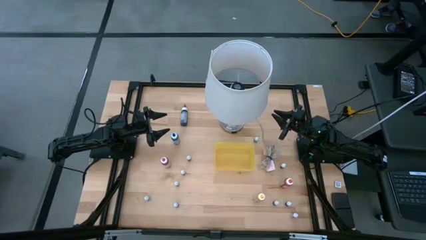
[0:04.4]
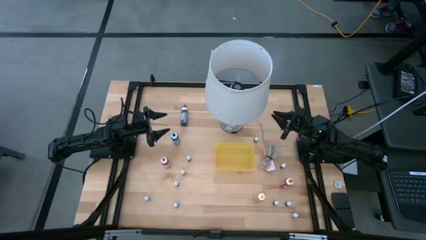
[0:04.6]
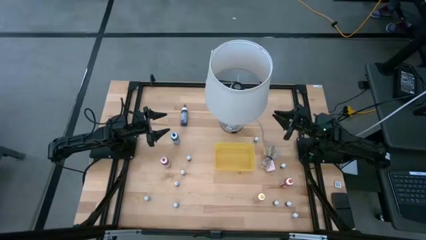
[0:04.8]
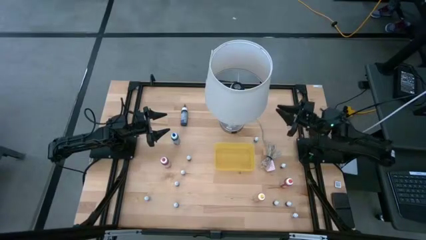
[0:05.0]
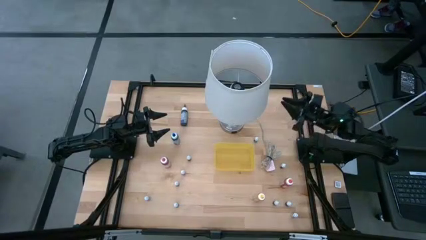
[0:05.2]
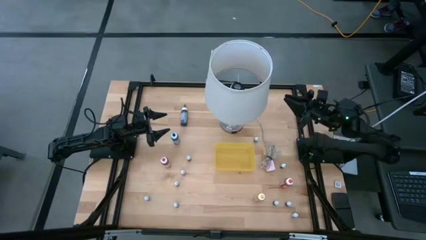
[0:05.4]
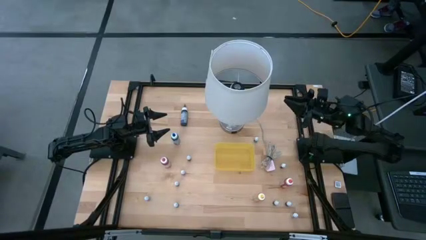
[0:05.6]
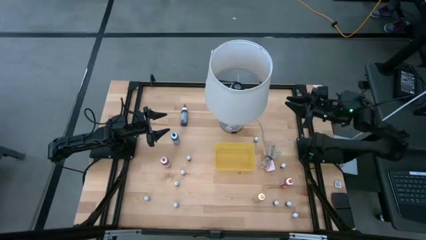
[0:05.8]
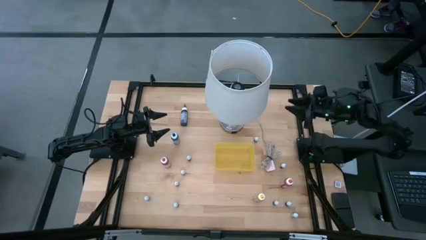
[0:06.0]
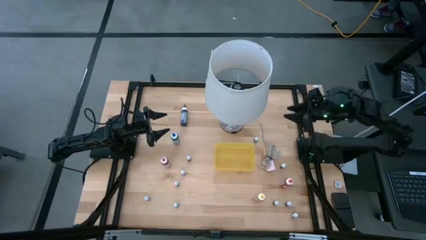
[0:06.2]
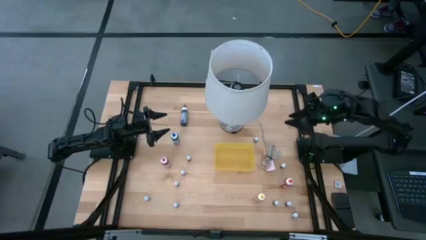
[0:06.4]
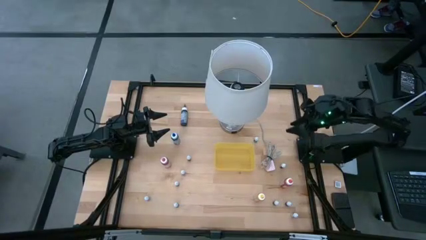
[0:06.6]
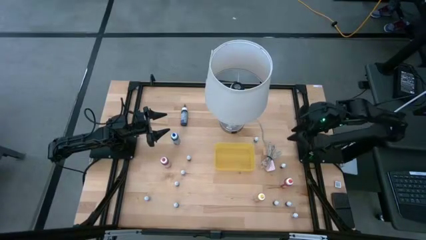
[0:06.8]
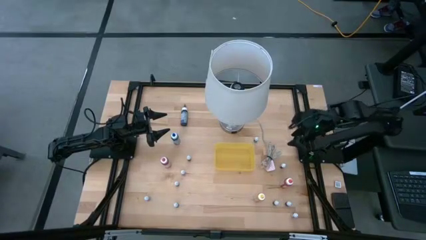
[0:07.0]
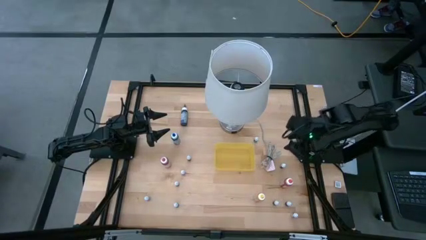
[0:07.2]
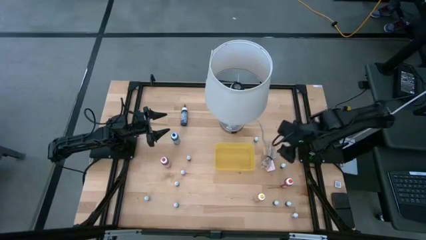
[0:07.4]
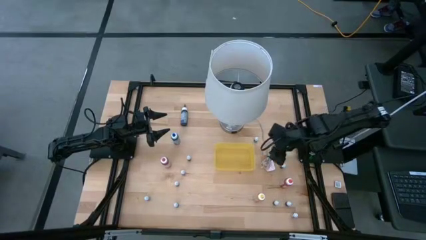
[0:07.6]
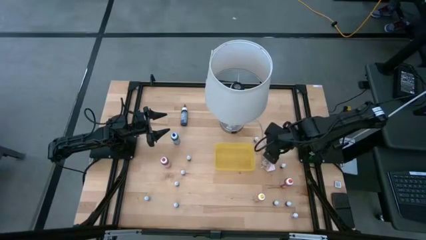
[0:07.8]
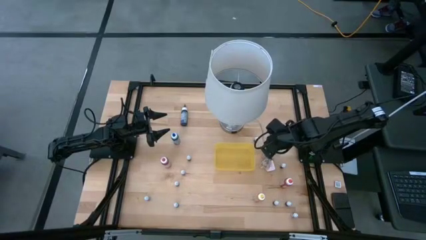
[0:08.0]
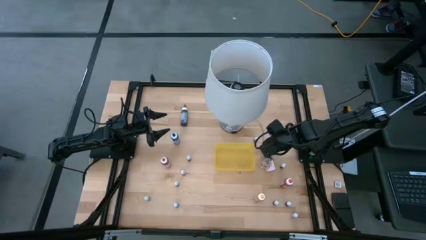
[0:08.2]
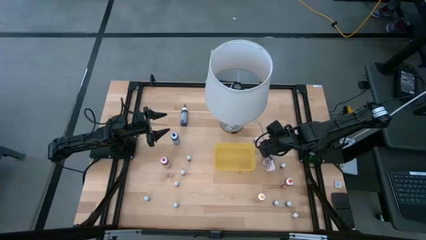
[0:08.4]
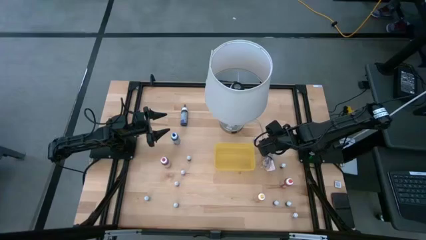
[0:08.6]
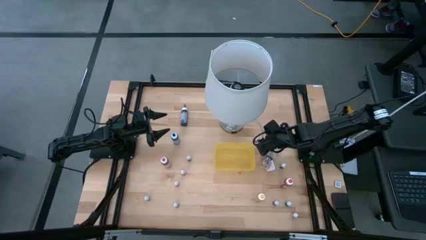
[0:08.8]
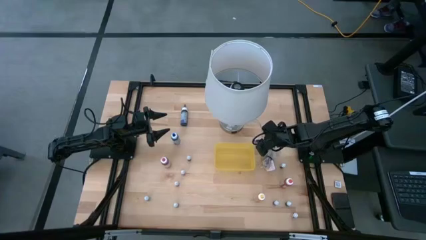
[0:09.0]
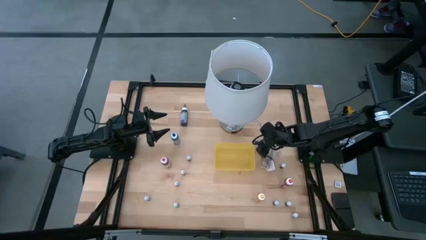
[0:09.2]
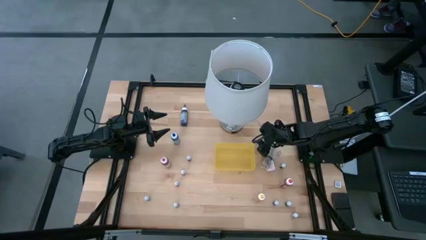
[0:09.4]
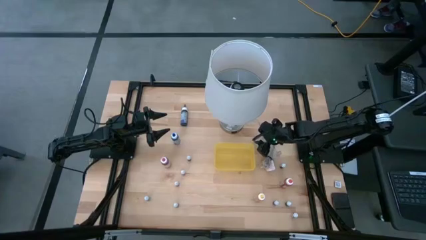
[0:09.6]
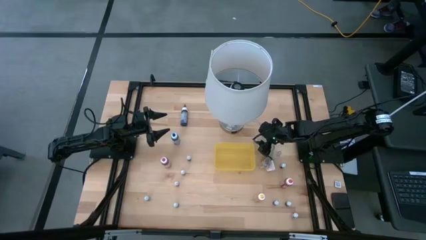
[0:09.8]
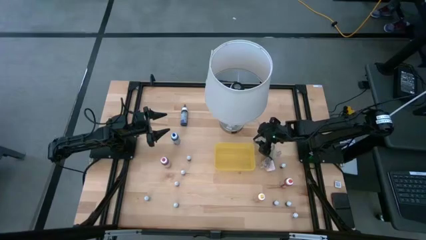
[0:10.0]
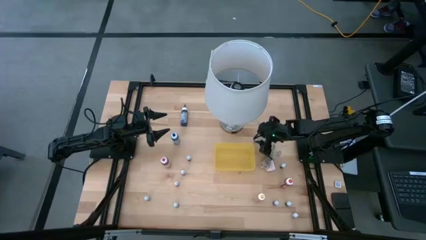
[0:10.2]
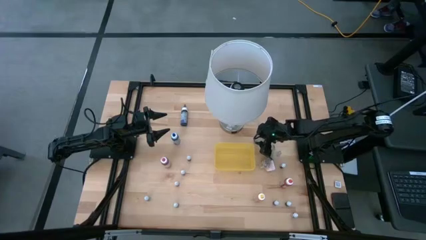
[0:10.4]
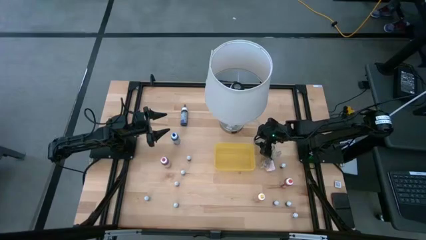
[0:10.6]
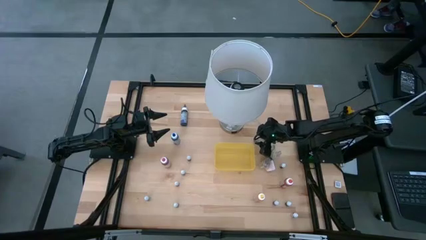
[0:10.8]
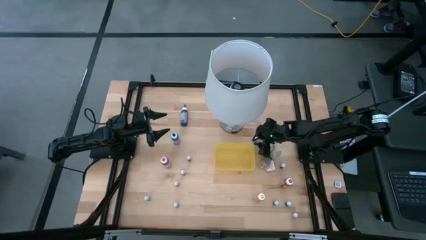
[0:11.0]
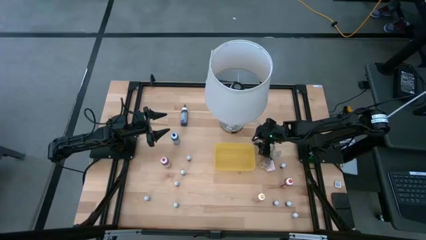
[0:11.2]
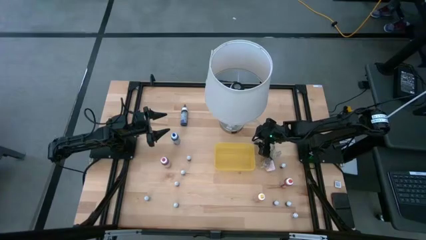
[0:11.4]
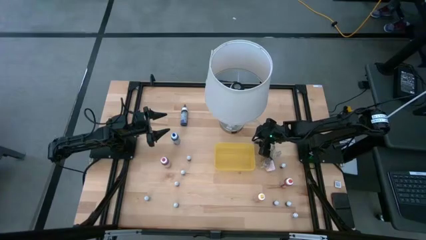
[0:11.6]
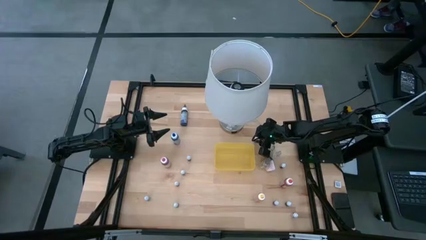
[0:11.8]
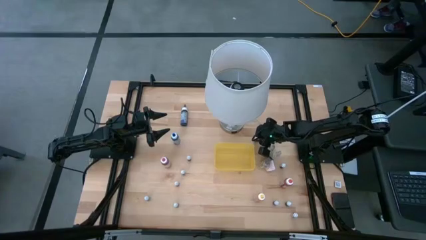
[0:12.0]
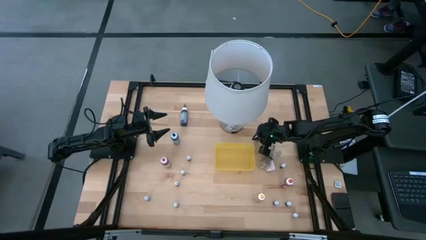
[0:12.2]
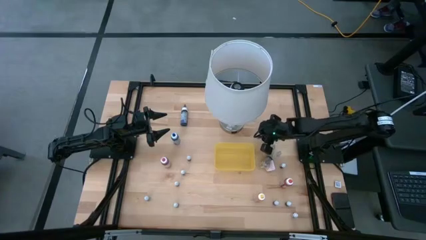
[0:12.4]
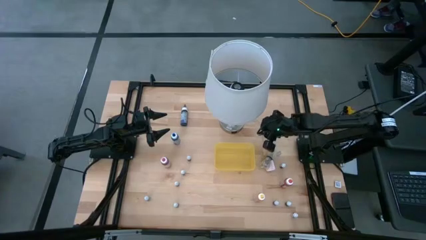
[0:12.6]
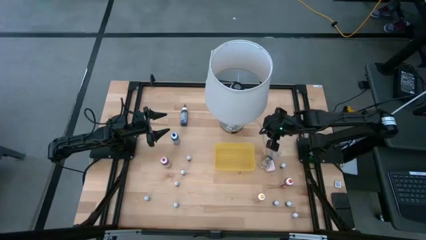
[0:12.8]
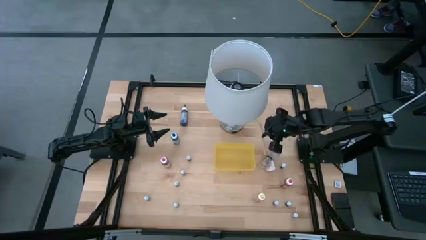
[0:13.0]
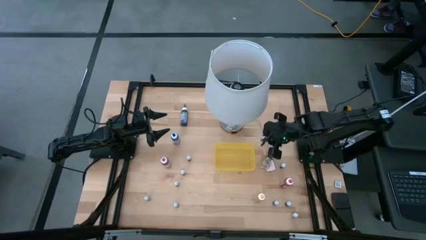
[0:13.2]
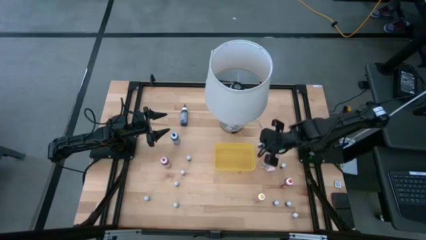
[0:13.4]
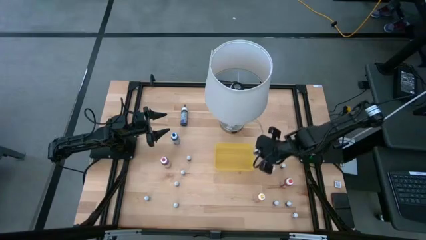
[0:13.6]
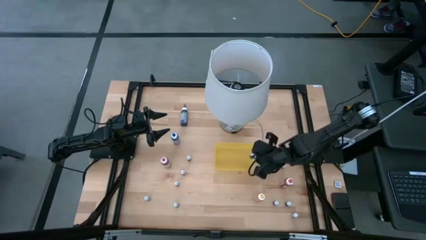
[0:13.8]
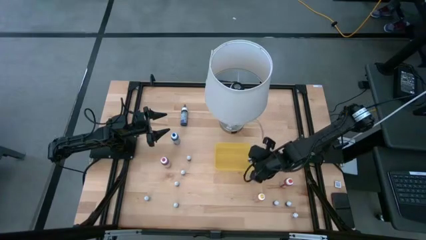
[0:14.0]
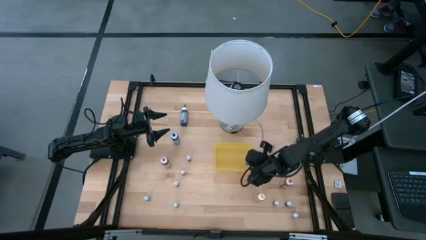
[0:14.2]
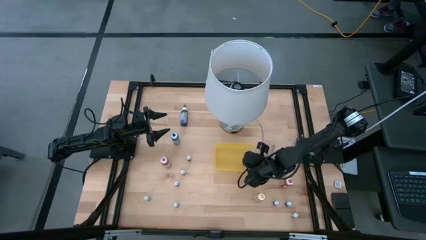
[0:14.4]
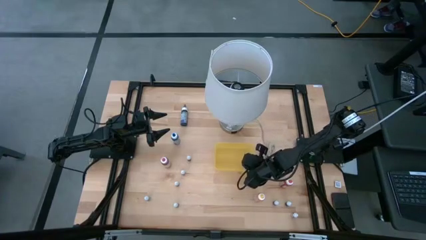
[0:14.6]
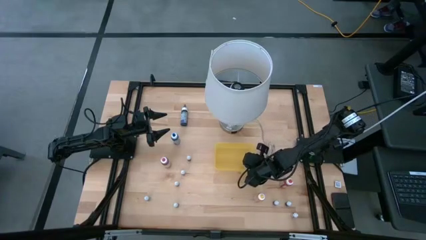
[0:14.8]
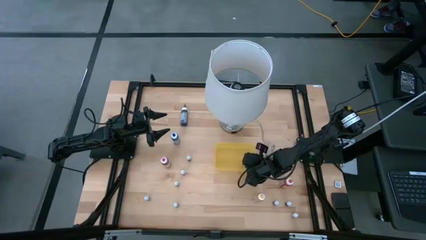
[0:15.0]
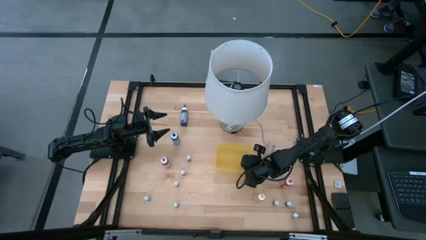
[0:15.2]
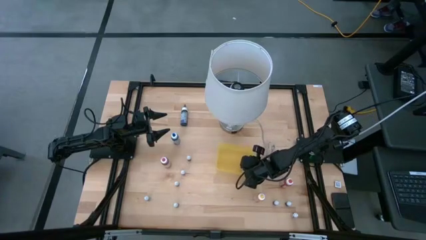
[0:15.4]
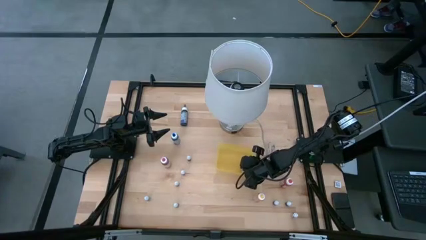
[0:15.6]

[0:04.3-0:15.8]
Task: Pick & Place food coloring
Put the blue food coloring bottle into the yellow bin

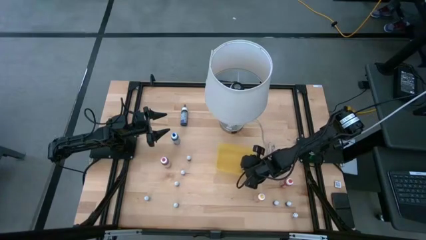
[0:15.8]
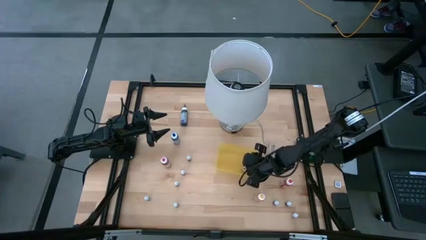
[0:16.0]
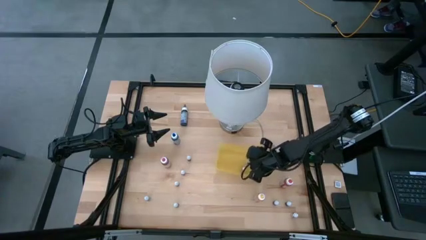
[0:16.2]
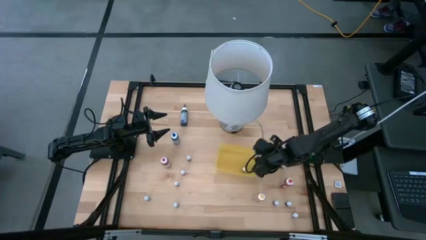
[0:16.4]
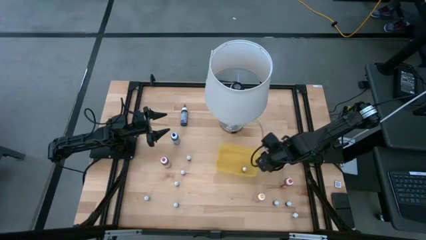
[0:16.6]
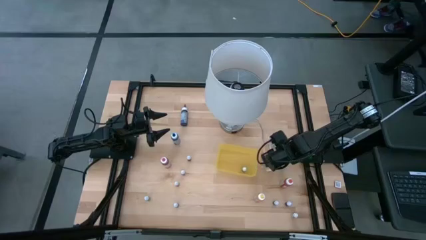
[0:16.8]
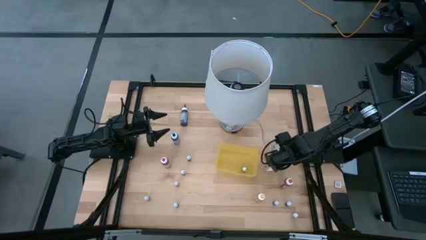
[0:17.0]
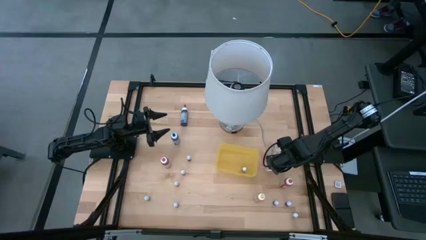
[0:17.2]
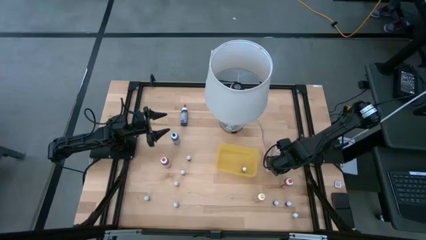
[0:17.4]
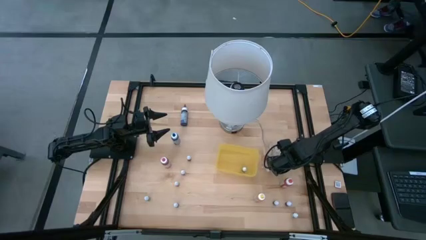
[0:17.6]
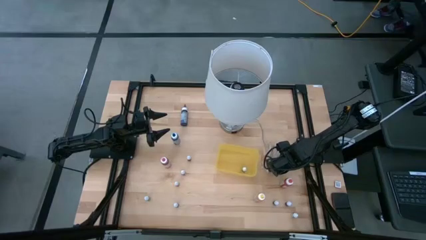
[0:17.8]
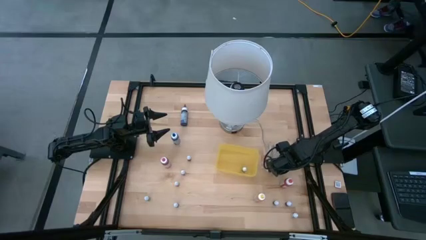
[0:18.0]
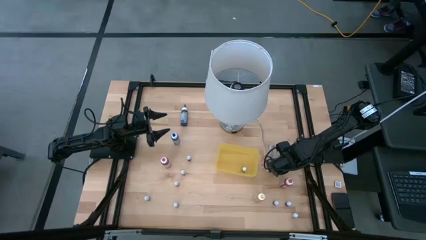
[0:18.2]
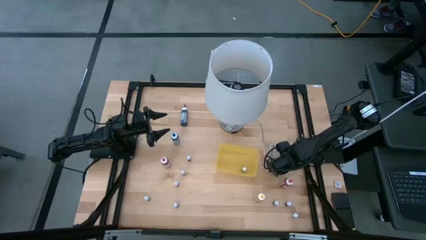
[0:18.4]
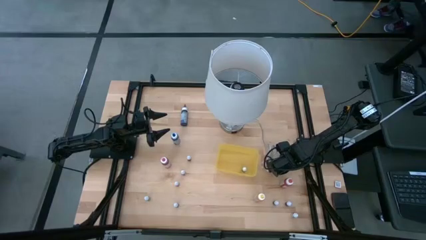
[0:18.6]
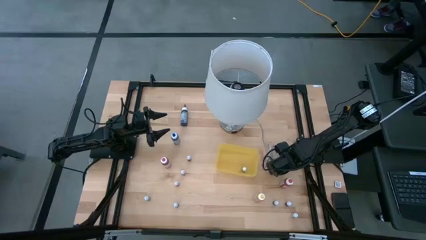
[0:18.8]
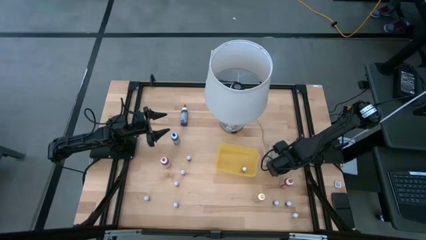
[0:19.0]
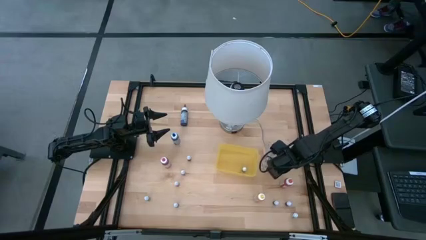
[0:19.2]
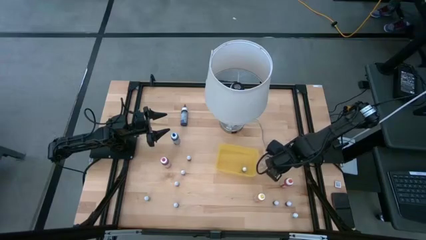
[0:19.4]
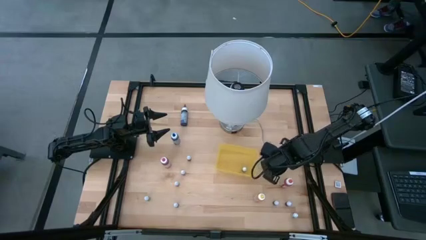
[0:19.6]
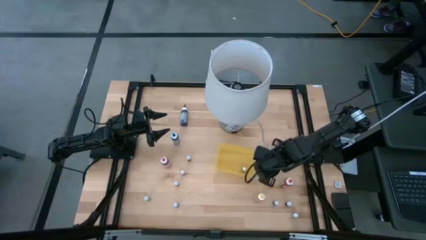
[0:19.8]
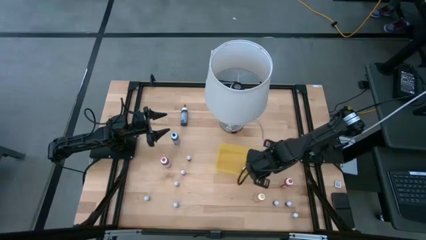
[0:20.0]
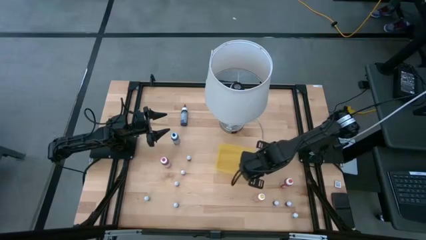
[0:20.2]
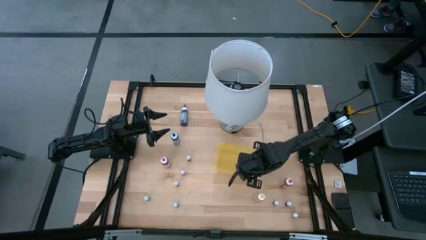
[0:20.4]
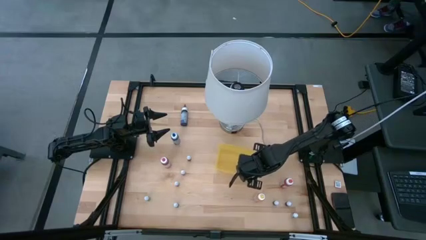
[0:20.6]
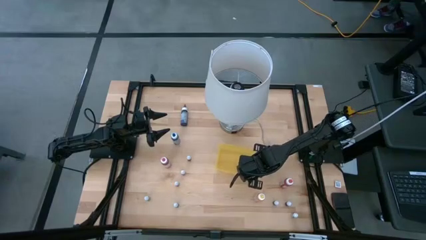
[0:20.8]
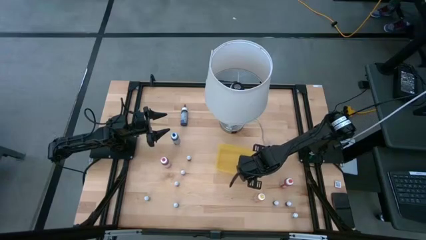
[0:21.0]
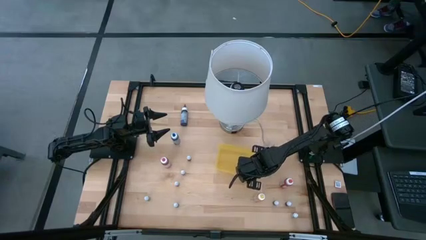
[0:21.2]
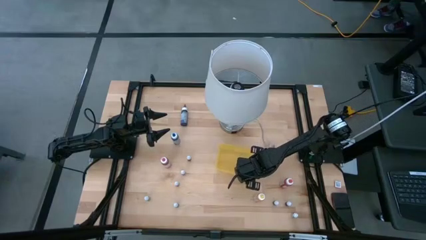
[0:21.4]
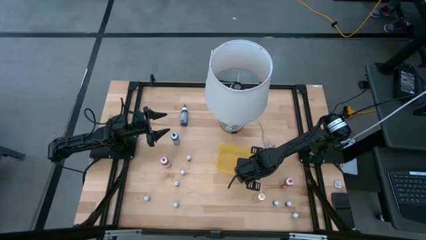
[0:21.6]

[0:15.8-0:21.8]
Put the green food coloring bottle into the yellow bin
